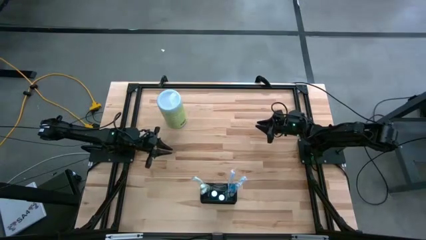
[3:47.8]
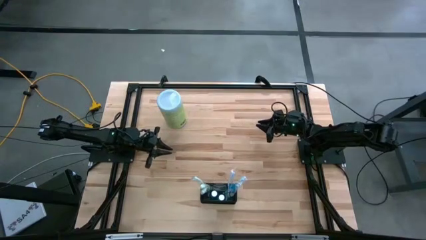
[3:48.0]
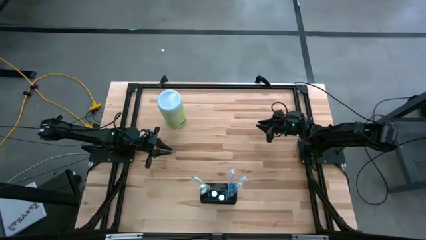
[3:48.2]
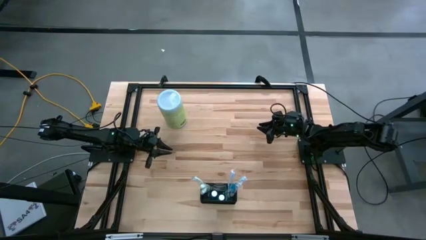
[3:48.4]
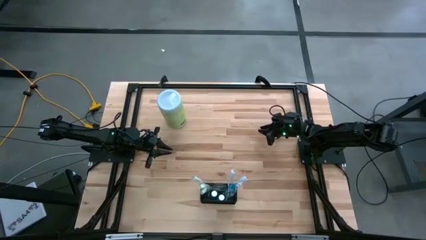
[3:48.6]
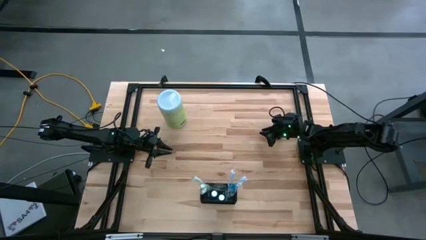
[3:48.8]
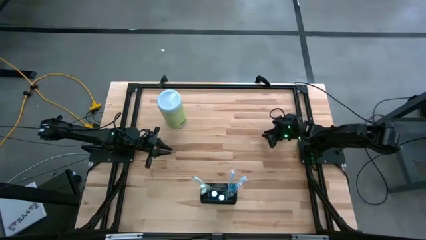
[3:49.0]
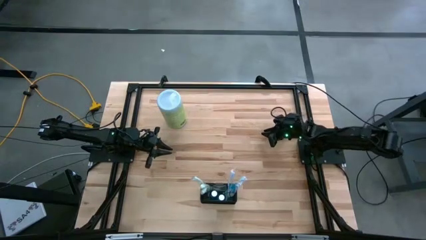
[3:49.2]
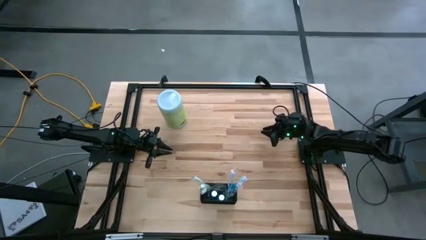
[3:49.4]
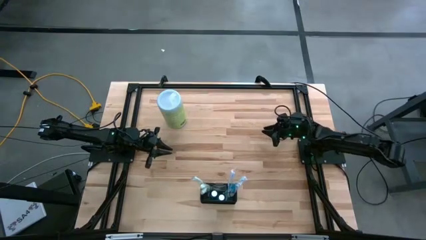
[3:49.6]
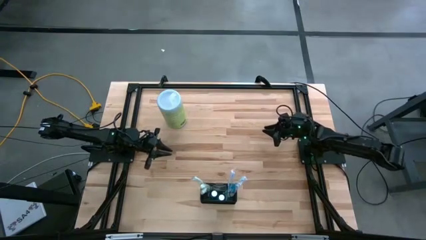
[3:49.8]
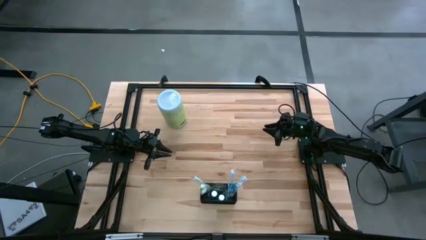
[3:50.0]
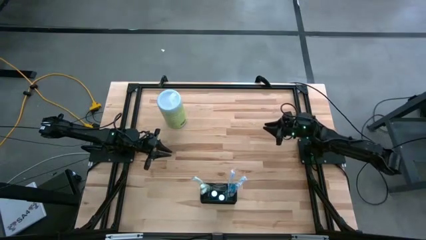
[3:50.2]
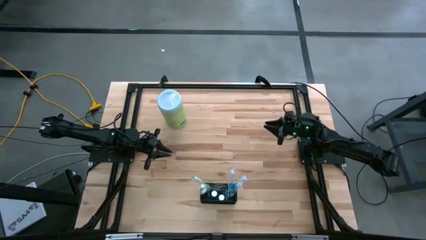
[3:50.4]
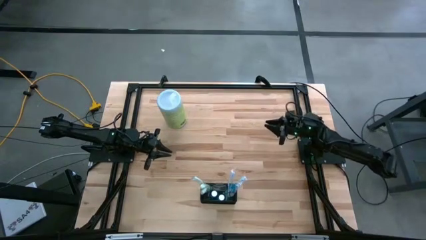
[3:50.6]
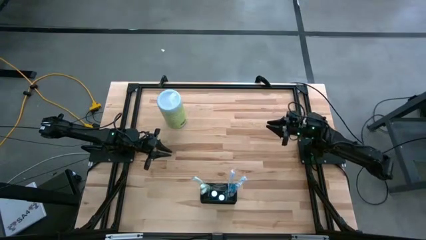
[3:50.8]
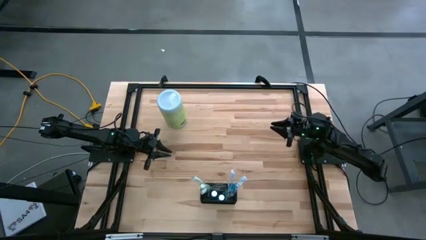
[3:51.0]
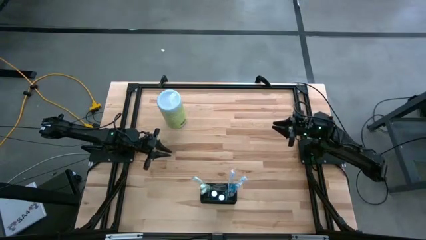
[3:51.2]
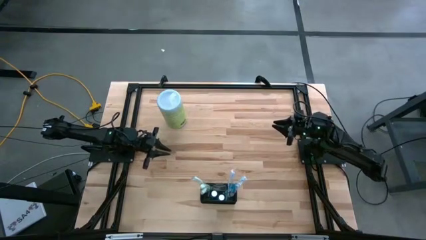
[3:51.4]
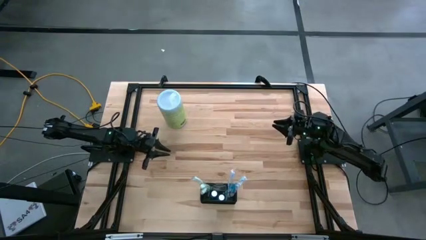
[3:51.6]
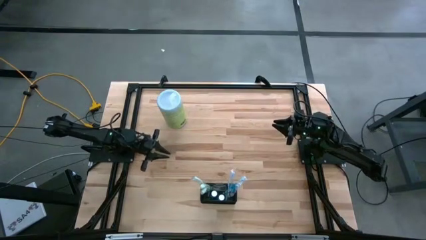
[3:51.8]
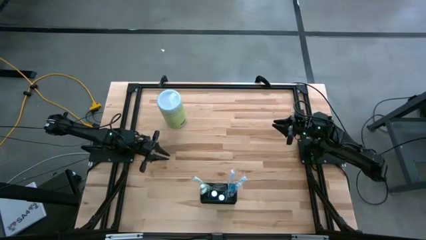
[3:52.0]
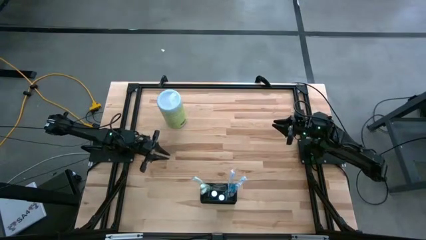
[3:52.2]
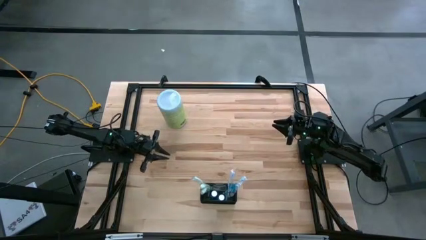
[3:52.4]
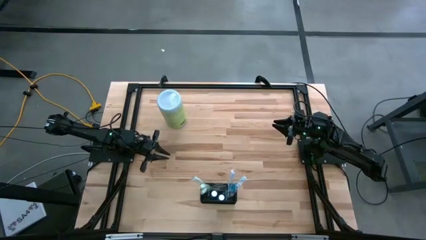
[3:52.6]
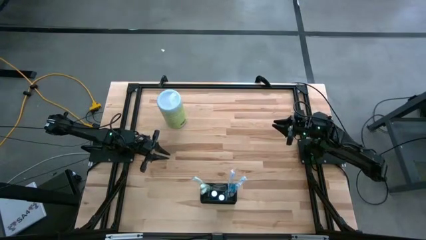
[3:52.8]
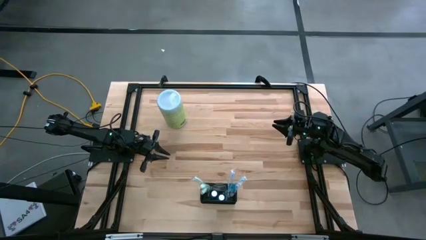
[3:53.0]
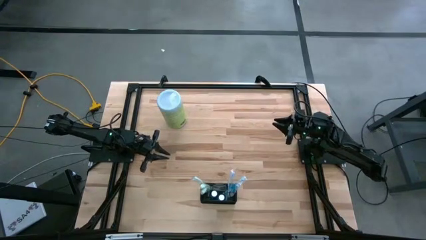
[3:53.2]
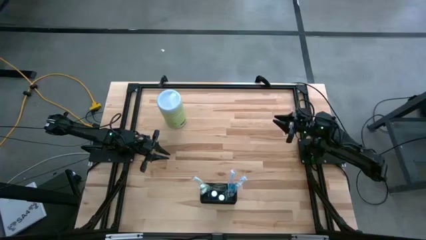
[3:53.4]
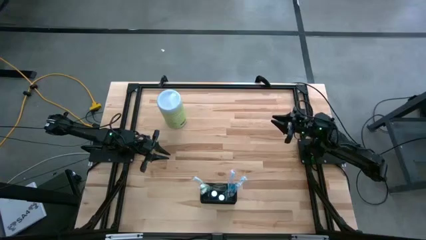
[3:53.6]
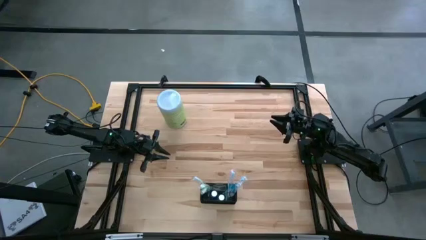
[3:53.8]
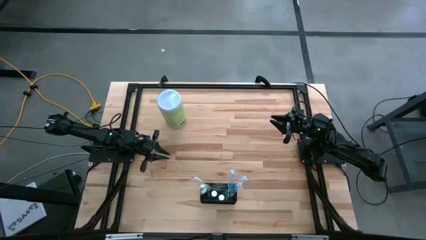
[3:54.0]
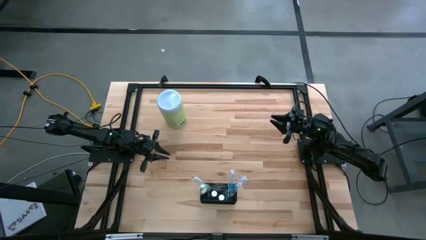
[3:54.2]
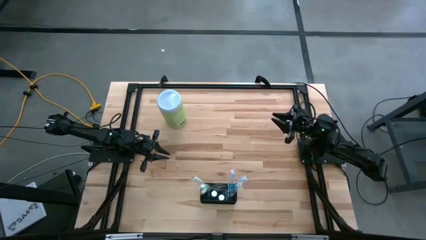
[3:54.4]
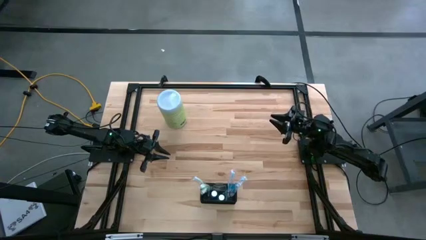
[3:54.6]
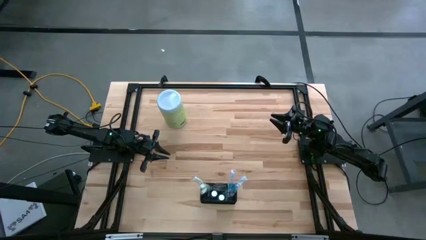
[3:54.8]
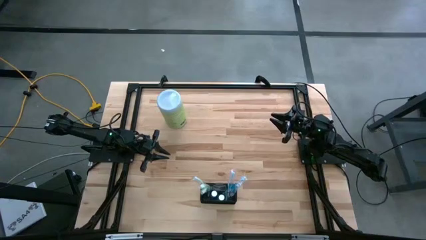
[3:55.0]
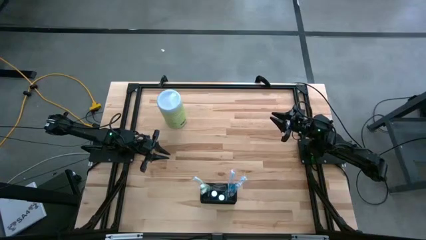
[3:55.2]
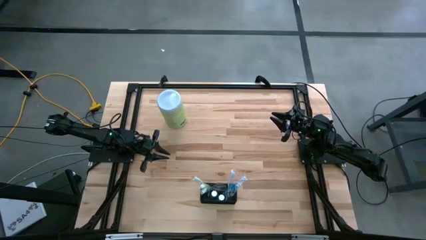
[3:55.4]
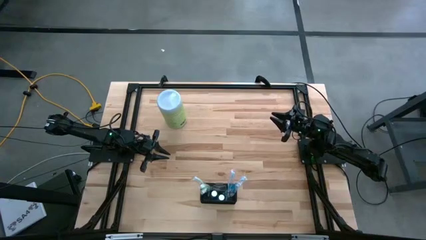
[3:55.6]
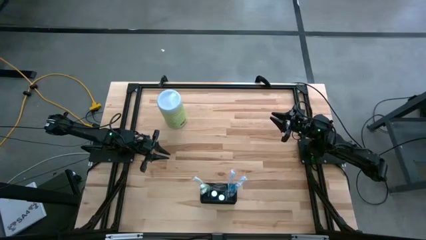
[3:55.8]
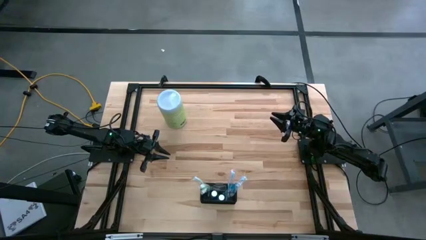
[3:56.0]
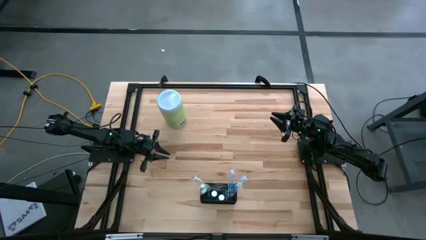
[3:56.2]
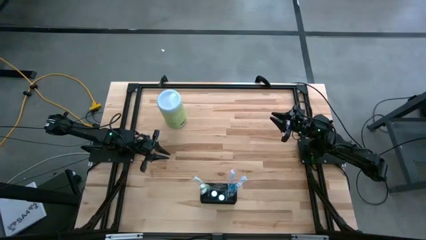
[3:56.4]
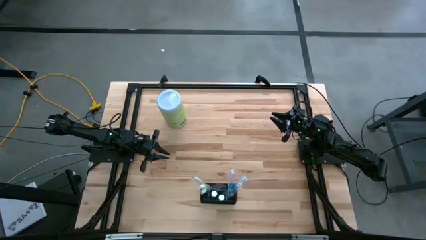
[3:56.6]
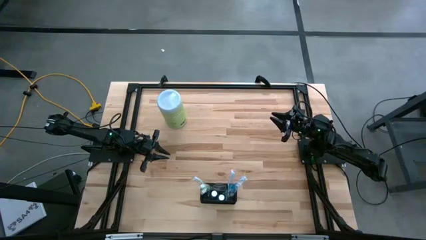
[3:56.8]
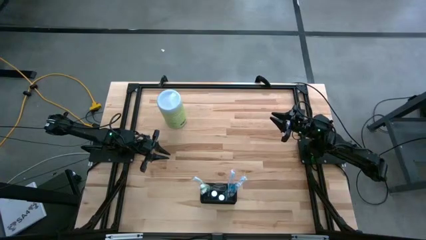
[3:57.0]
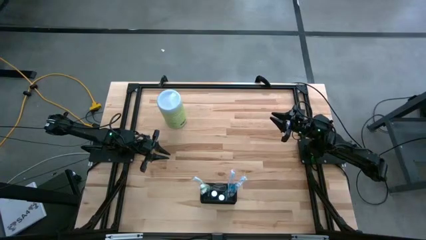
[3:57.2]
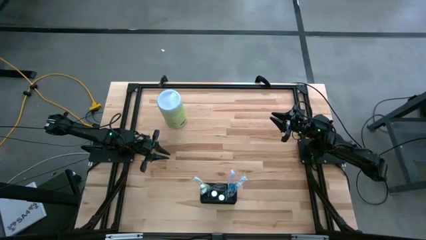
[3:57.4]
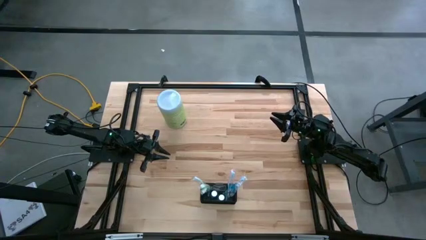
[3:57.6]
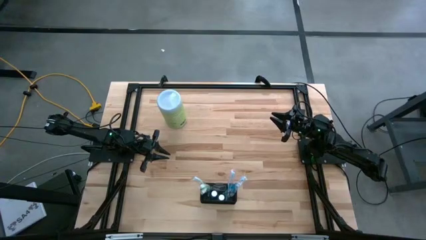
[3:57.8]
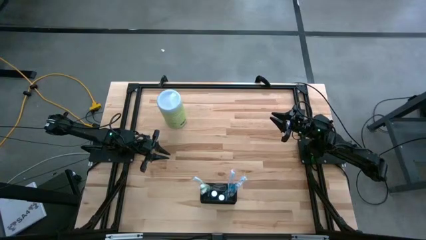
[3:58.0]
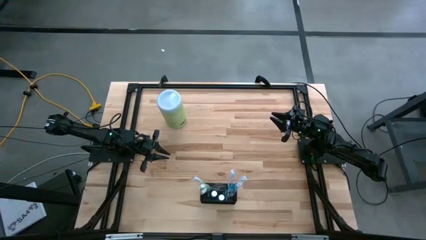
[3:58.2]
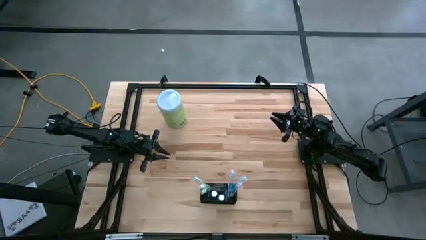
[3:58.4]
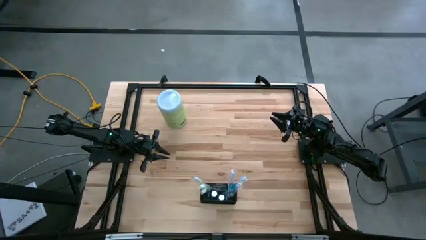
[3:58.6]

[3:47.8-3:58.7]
Task: Pick & Place toothbrushing station
Return to Home Position
